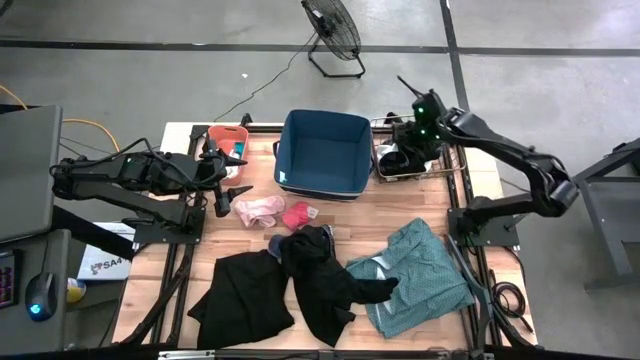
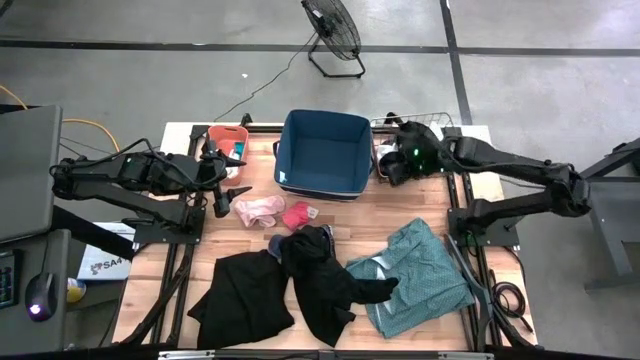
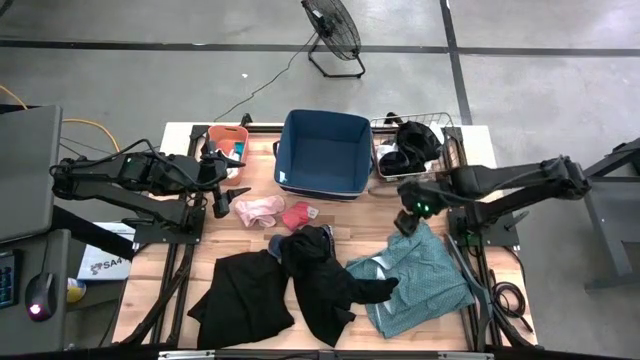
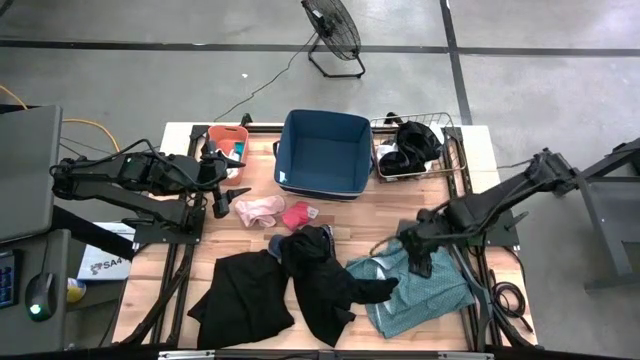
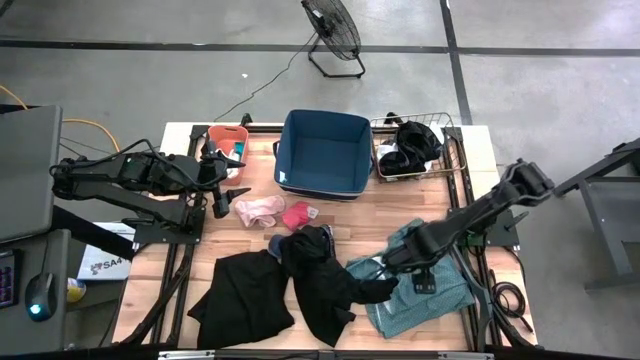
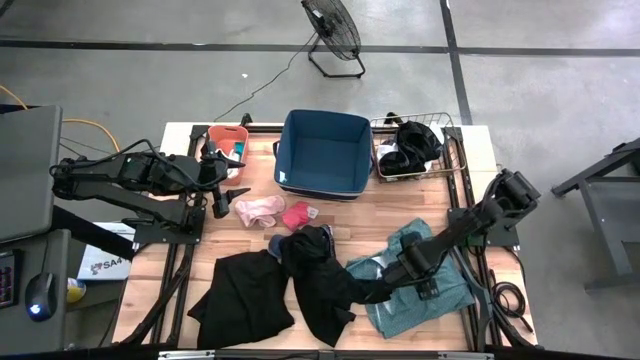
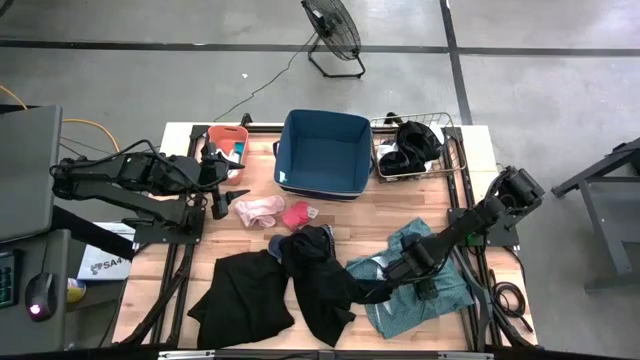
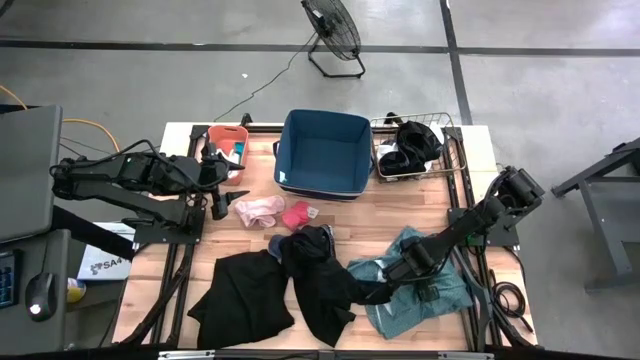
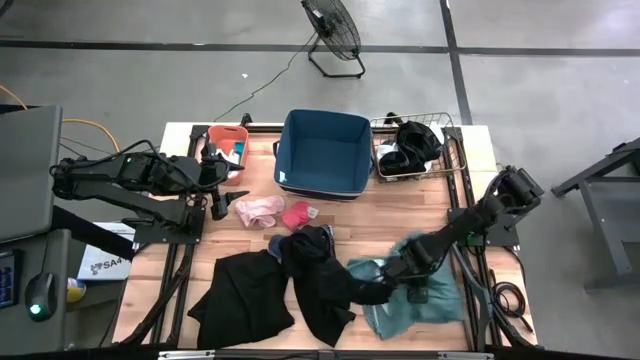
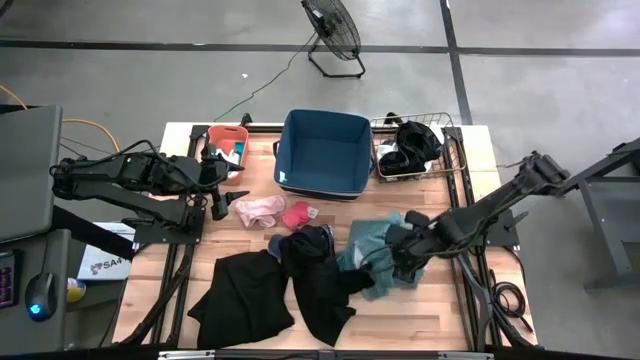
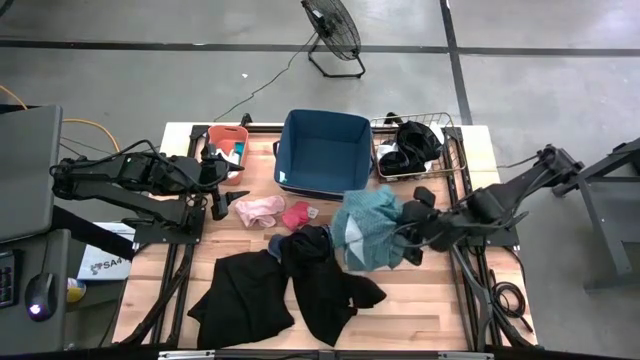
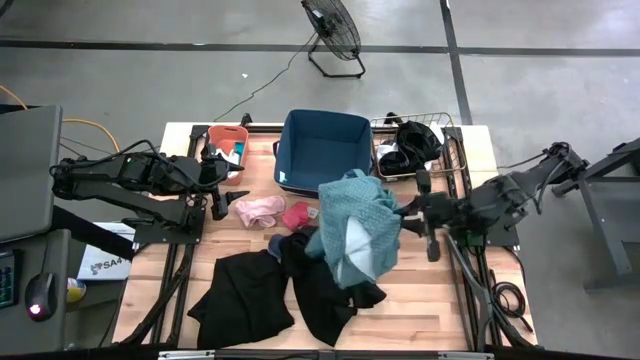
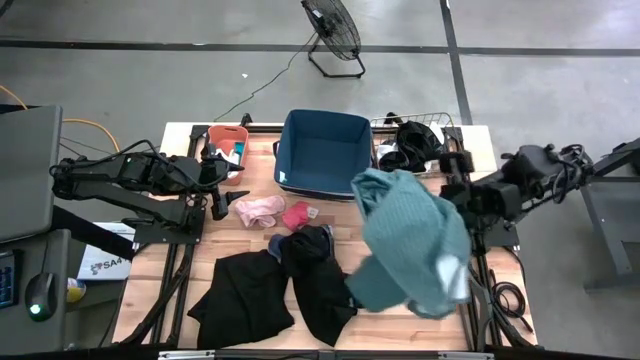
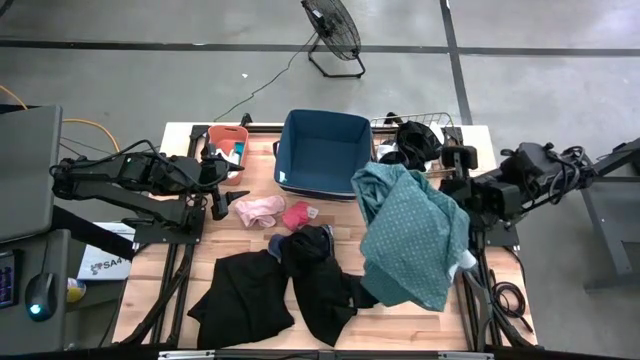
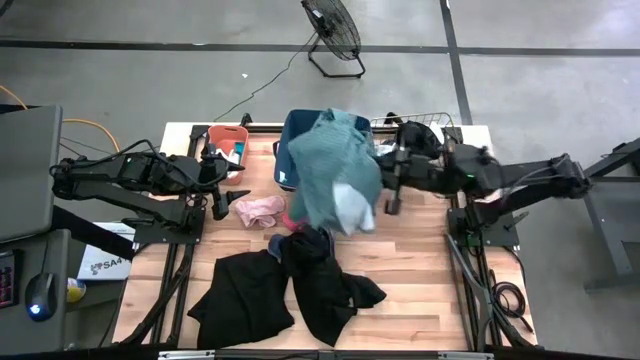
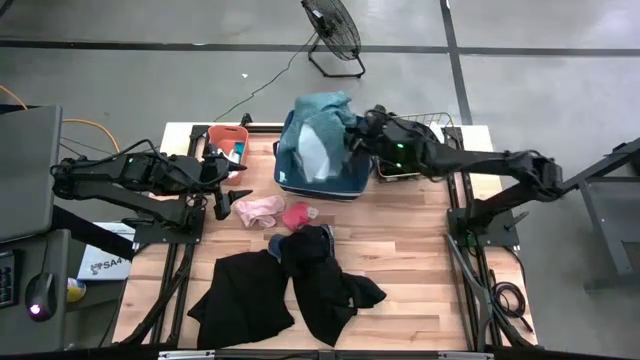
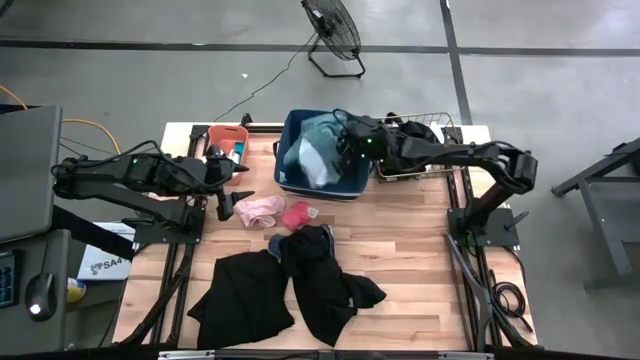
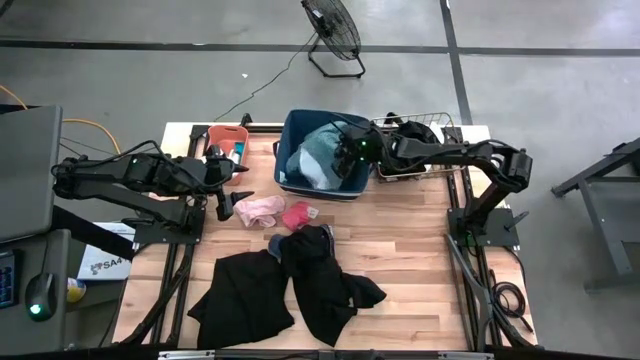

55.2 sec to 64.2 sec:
Task: Pick & Place Cloths
Put the green shorts into the blue laundry organizer

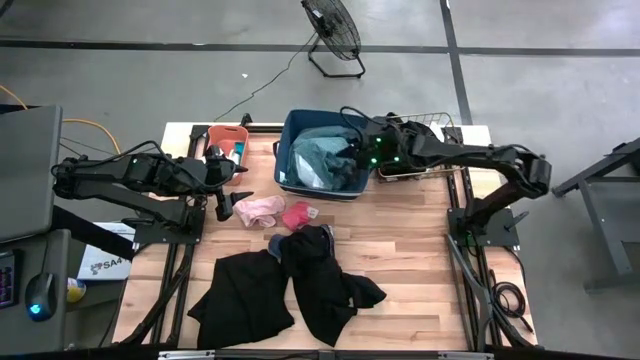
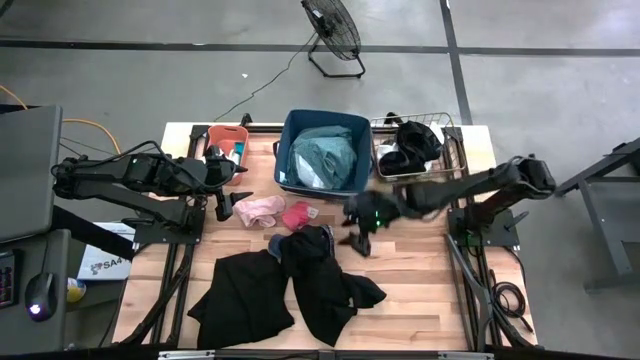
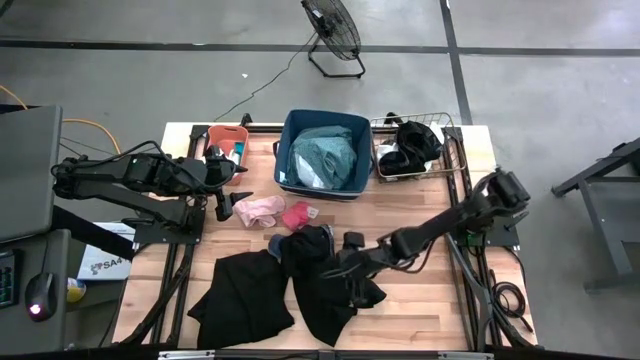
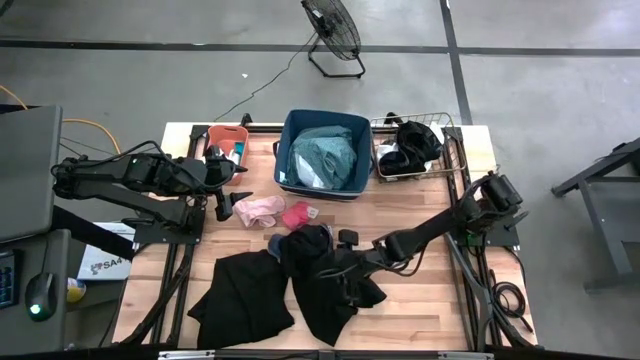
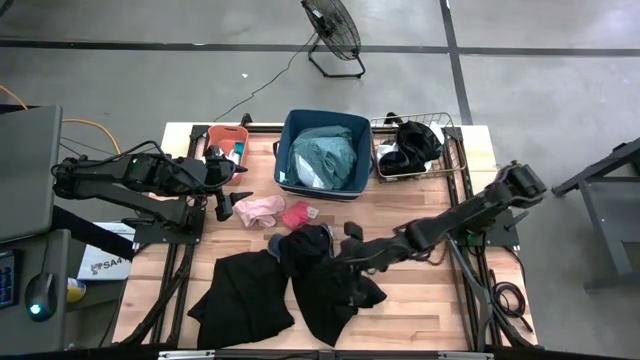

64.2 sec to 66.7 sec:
Put the bottom black boxer into the gold wire basket

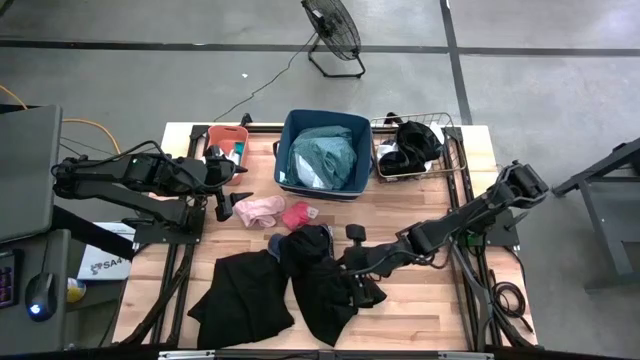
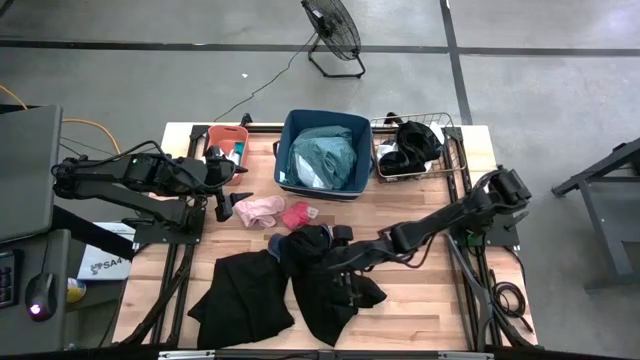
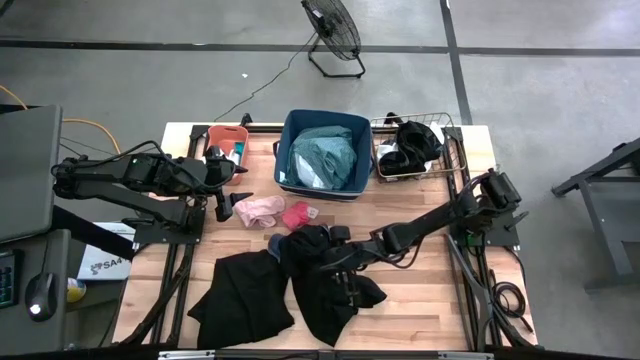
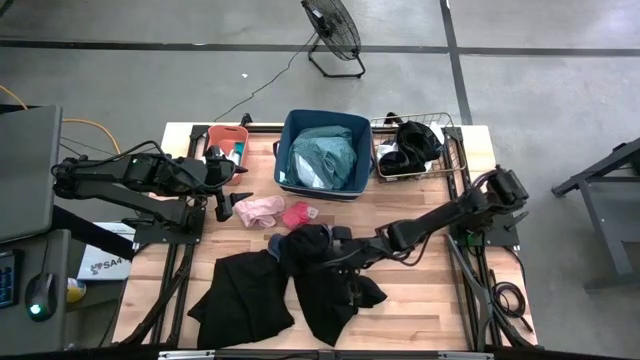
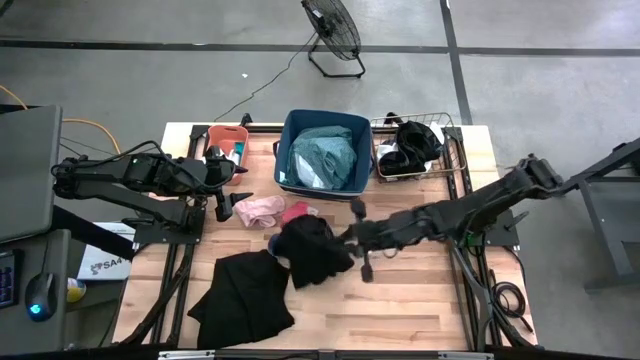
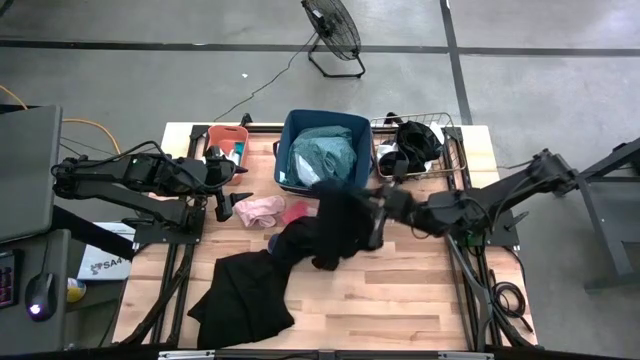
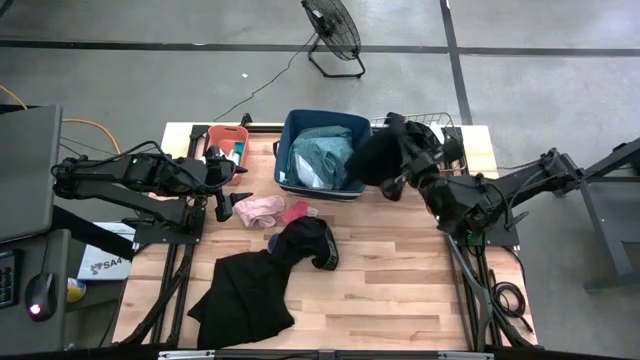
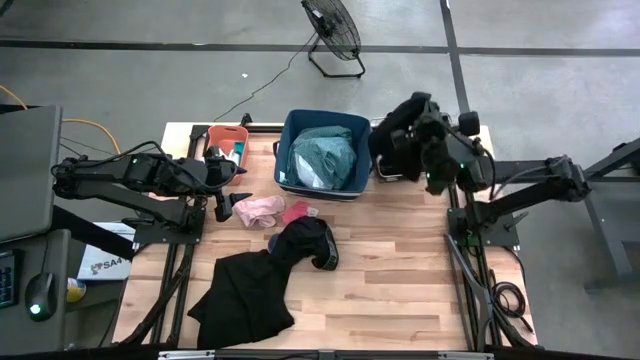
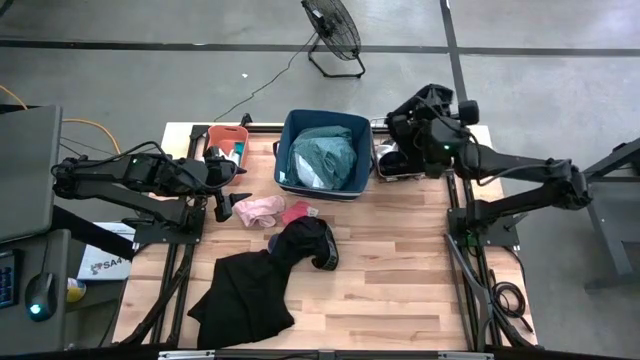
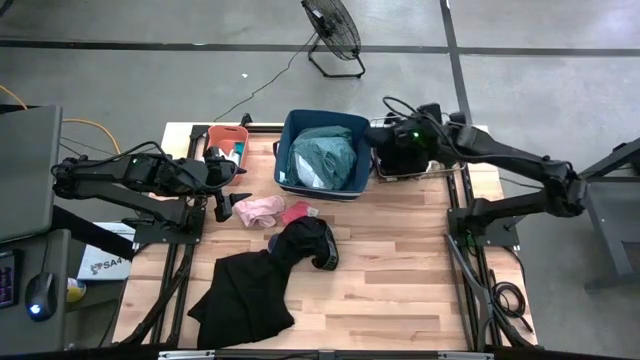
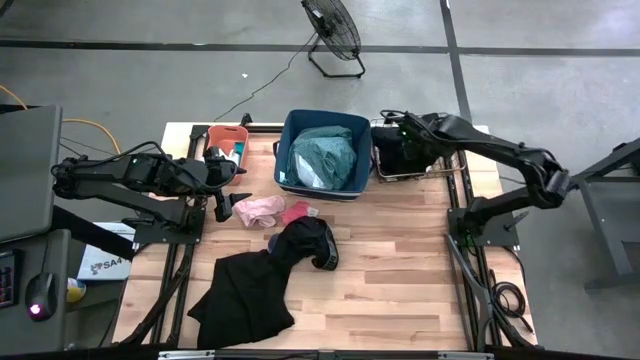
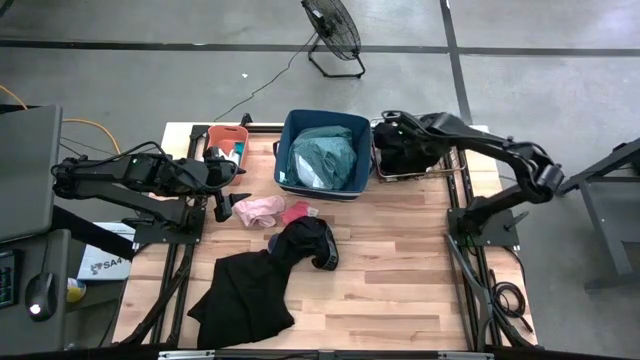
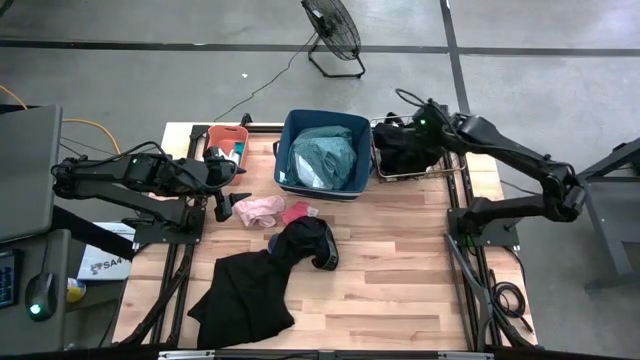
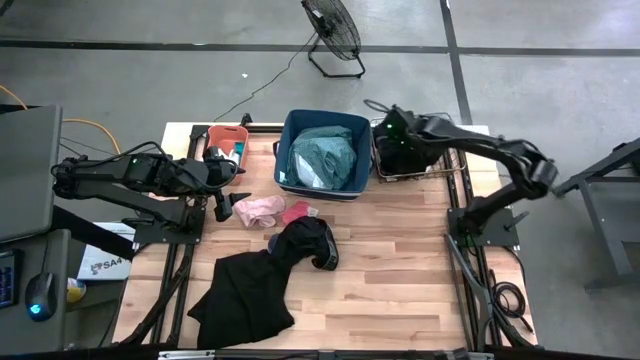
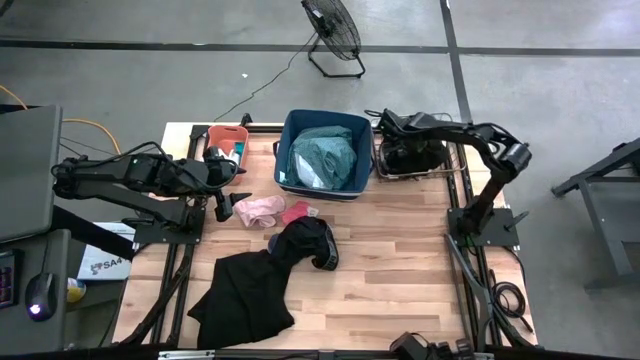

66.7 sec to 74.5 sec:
Put the bottom black boxer into the gold wire basket

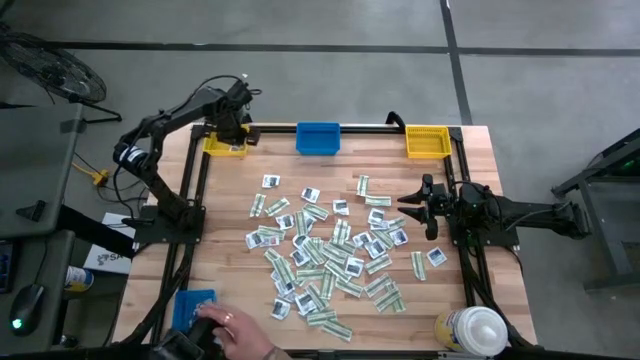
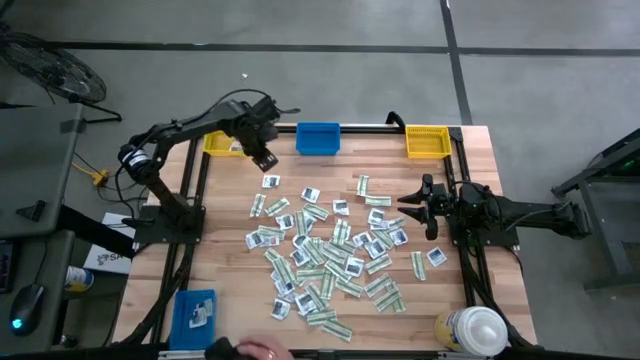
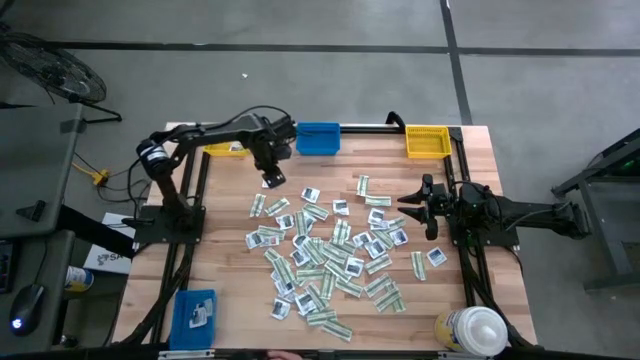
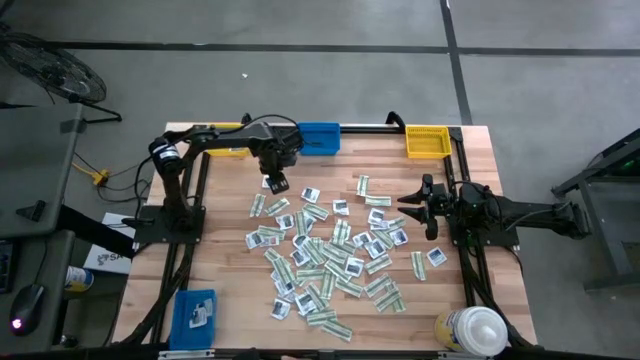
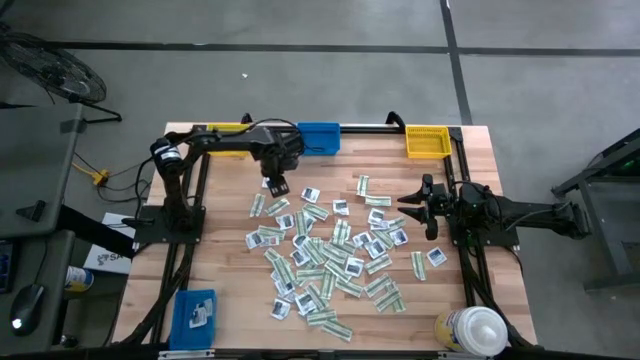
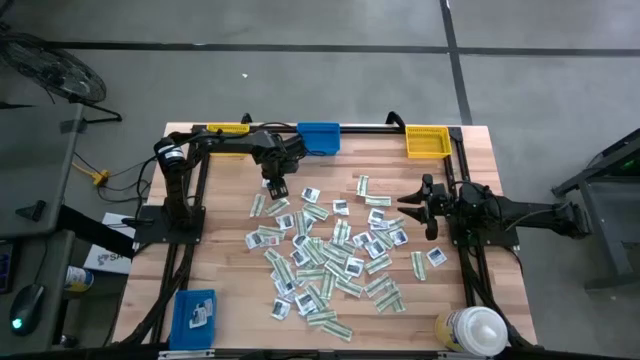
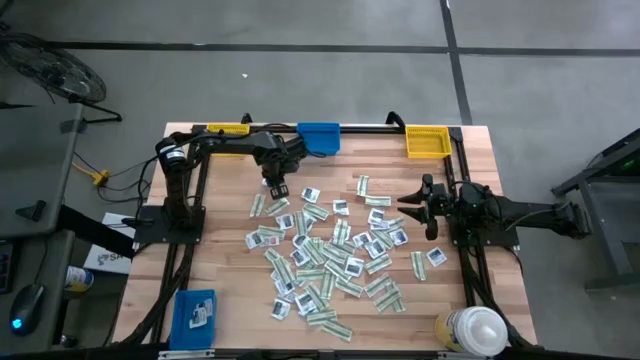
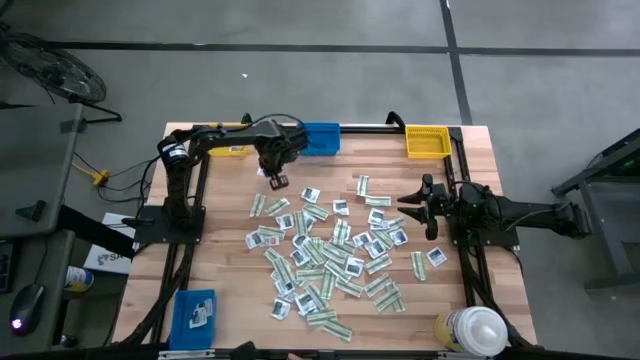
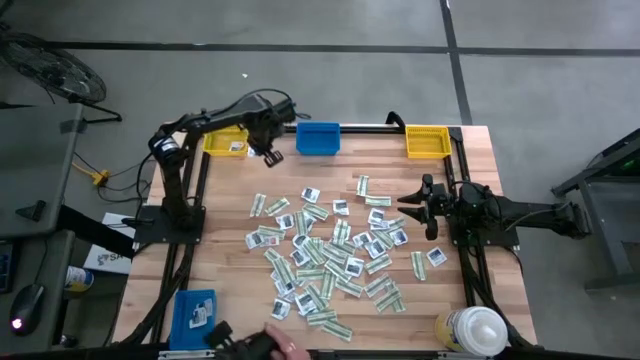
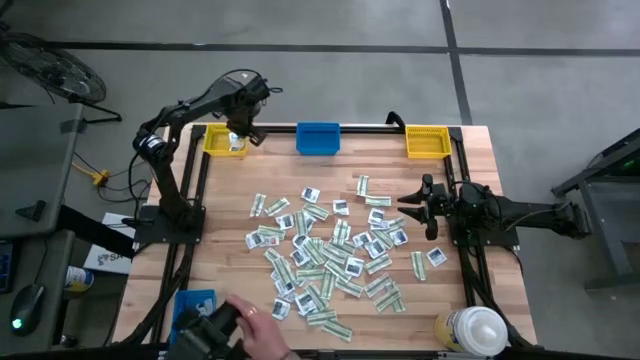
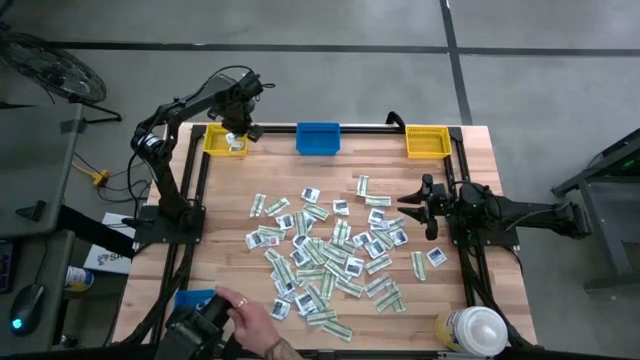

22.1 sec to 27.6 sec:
Task: Pick & Place First Aid Supplies
Put the gray towelette pack into the left yellow bin
